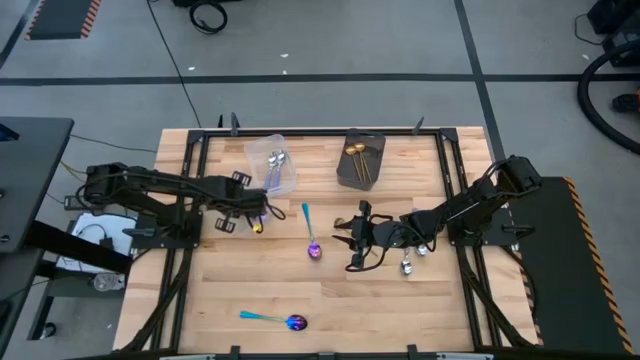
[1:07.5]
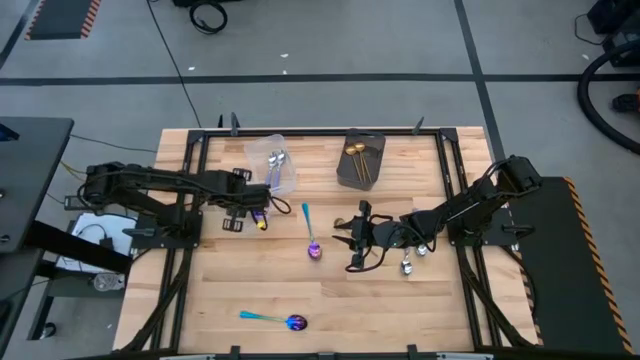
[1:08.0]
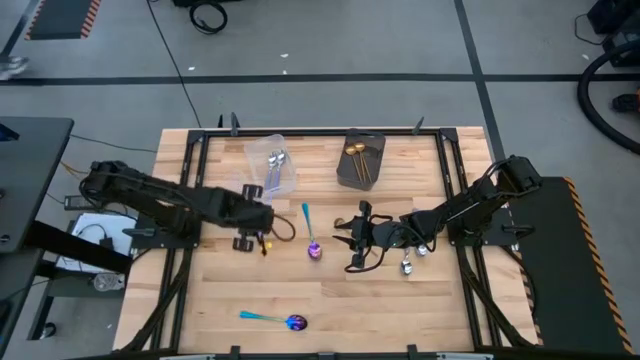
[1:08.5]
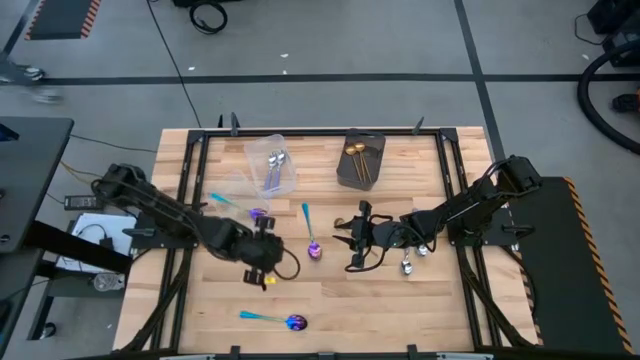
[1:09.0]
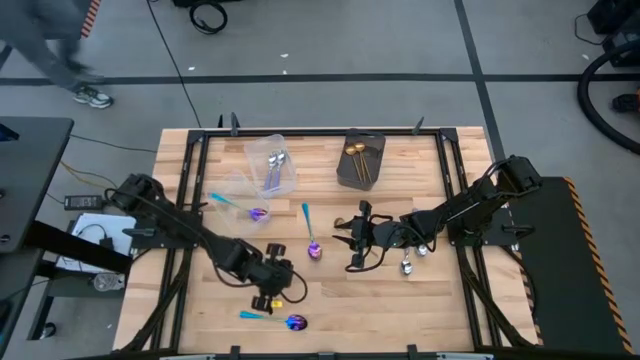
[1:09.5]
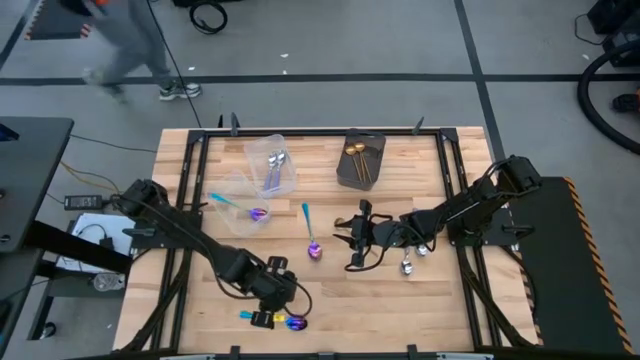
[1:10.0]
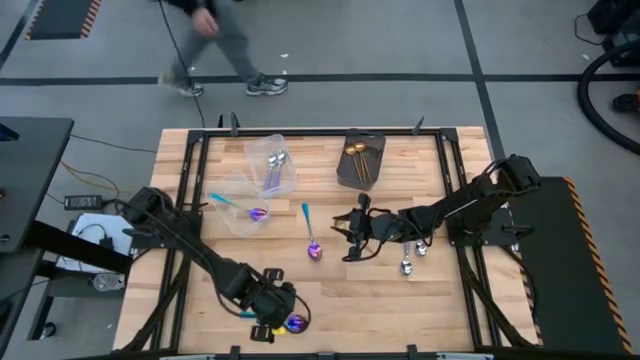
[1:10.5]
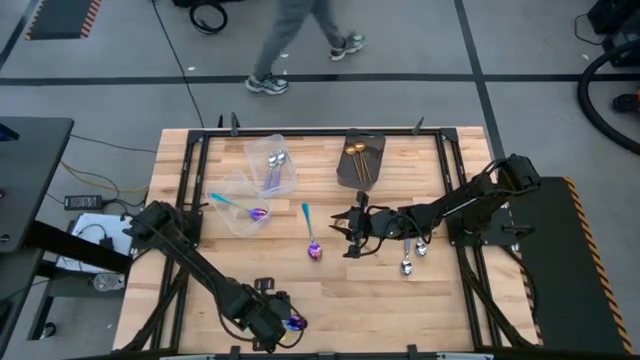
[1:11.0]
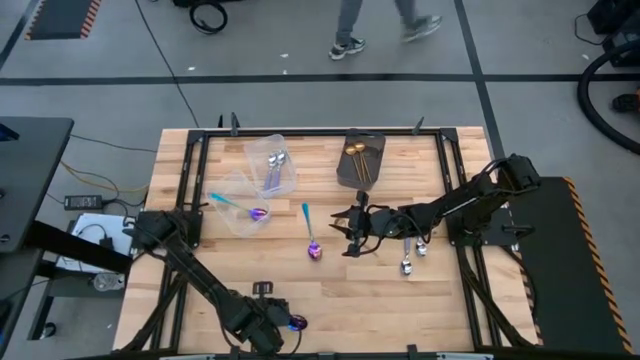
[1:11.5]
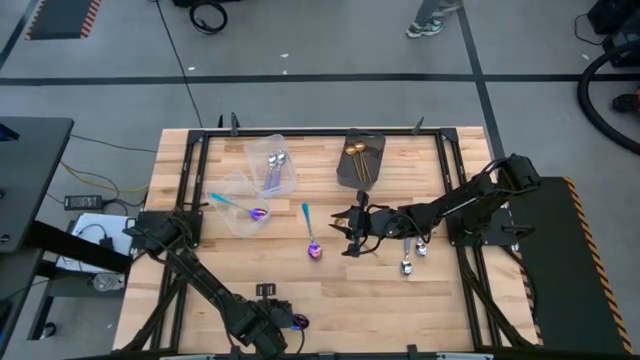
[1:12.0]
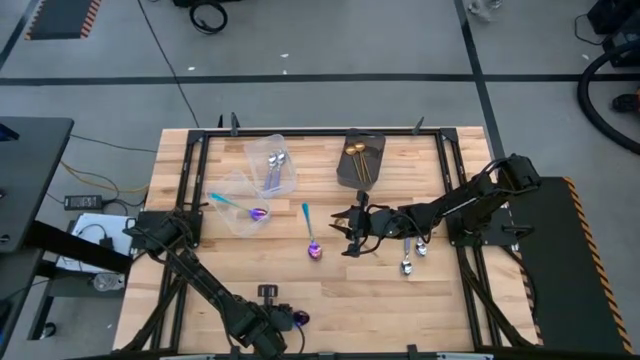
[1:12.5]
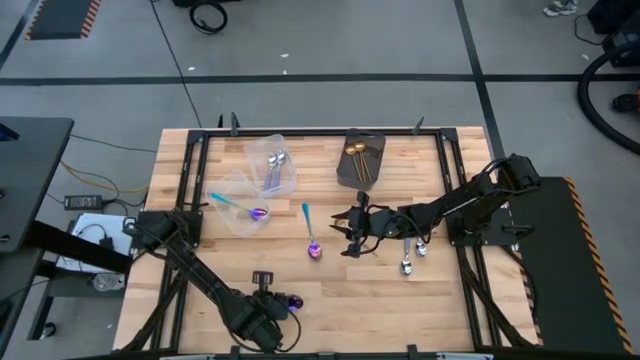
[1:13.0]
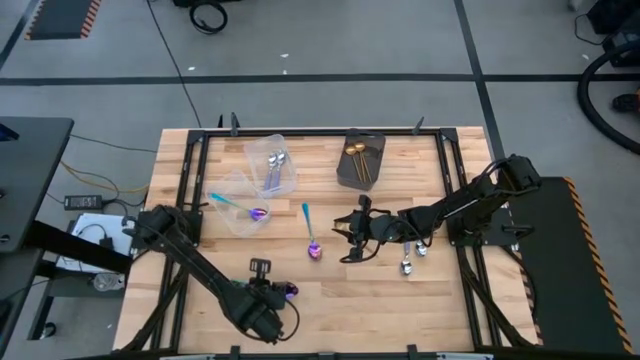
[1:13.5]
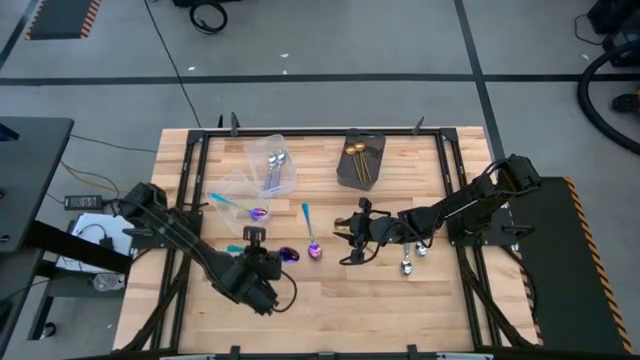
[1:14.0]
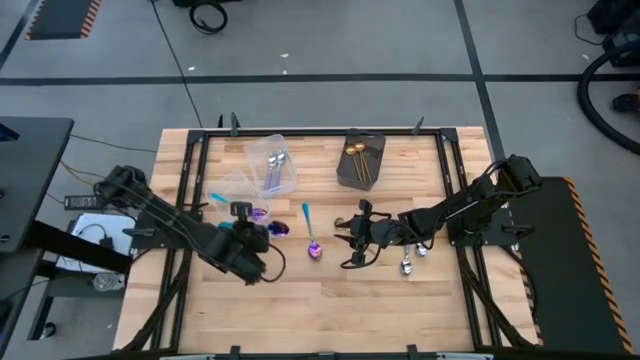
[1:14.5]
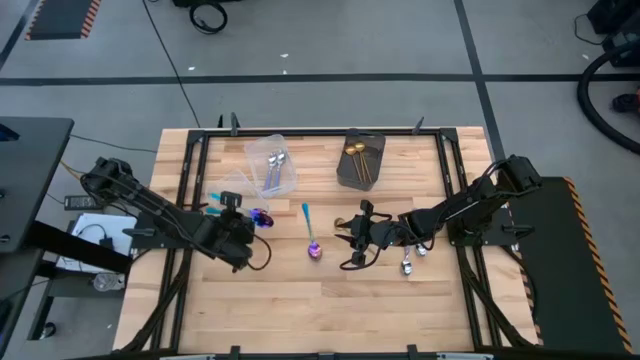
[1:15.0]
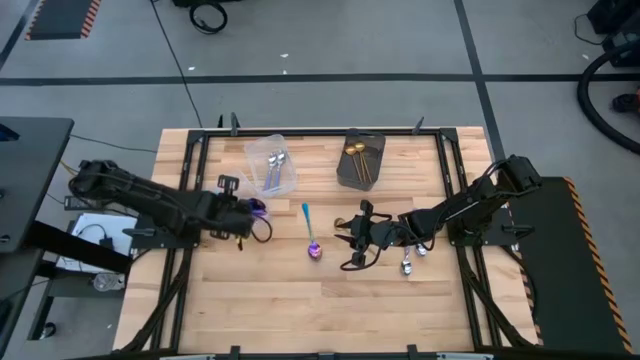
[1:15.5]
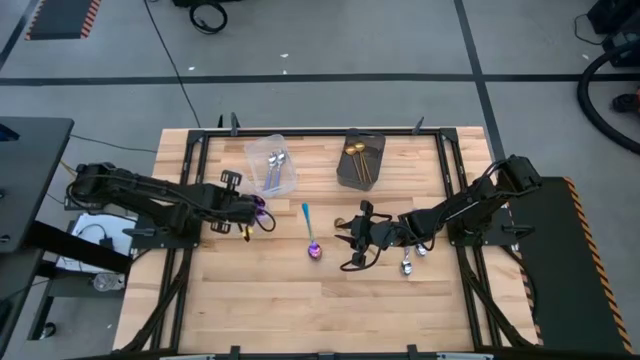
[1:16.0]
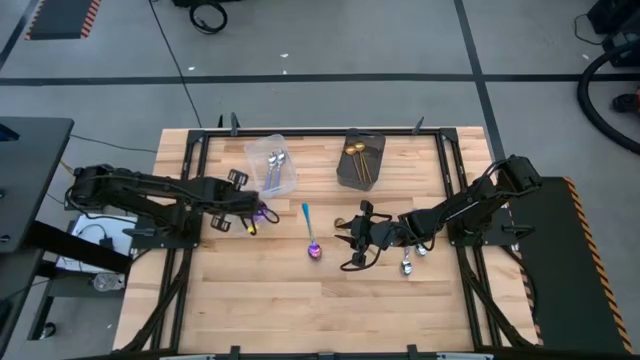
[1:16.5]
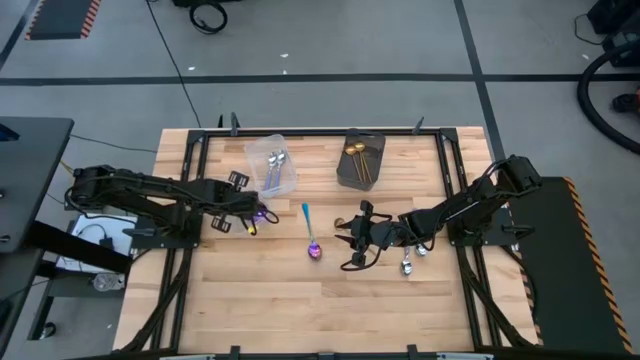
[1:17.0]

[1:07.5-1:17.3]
Task: Sort silverware by color (type)
Put the blue spoon into the left transparent bin

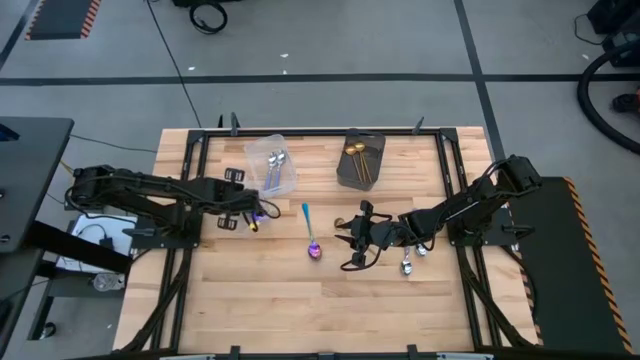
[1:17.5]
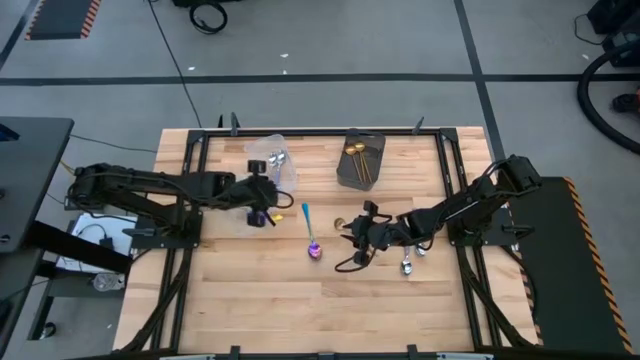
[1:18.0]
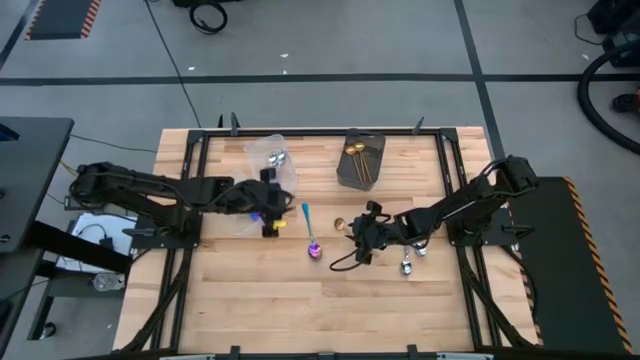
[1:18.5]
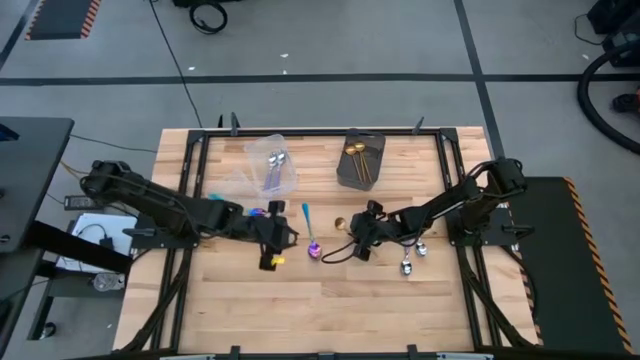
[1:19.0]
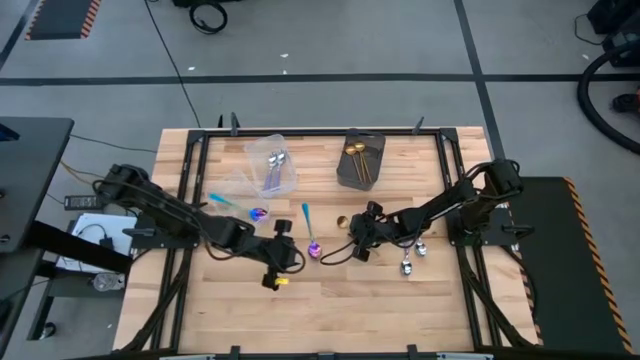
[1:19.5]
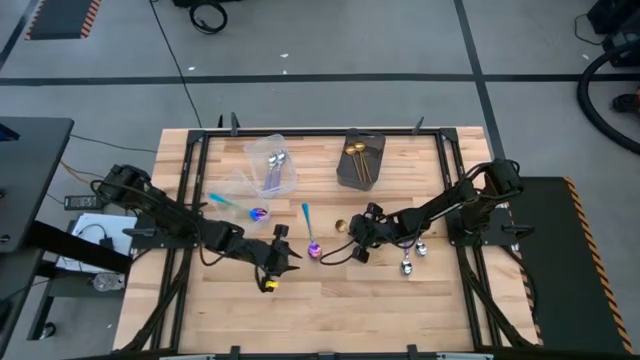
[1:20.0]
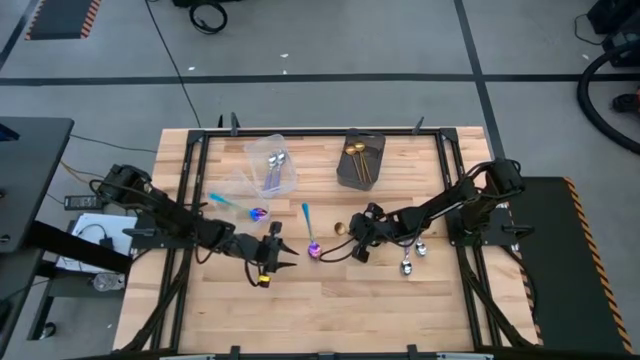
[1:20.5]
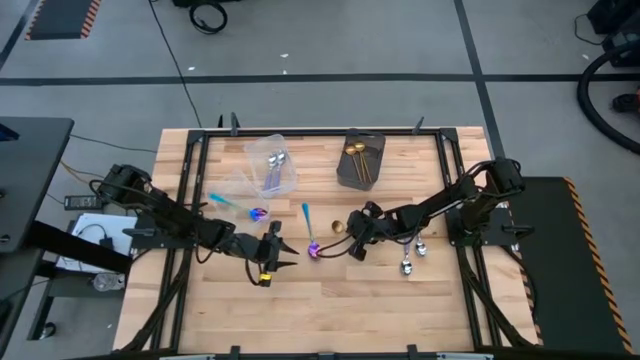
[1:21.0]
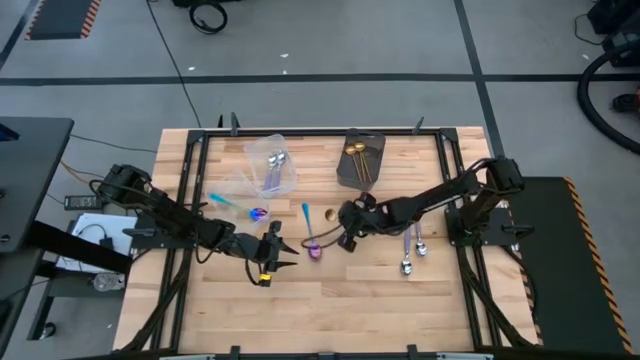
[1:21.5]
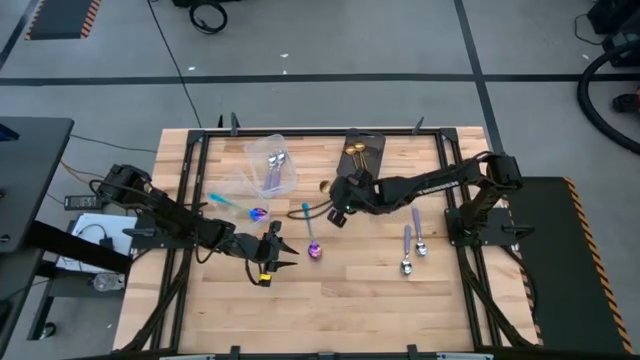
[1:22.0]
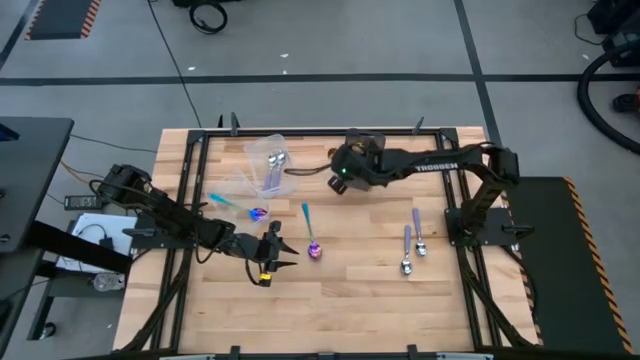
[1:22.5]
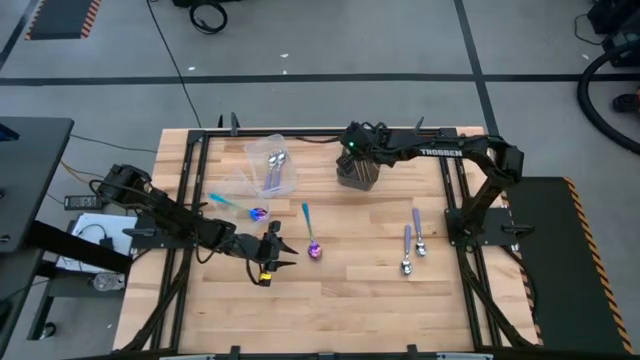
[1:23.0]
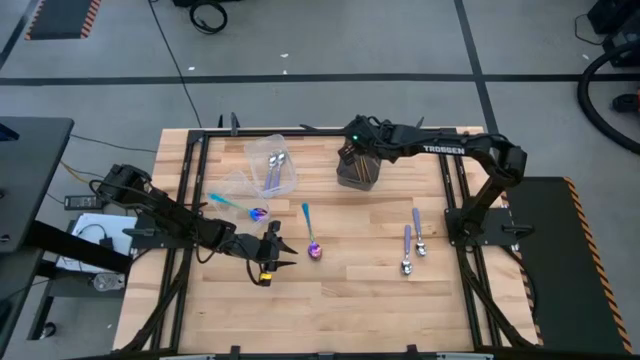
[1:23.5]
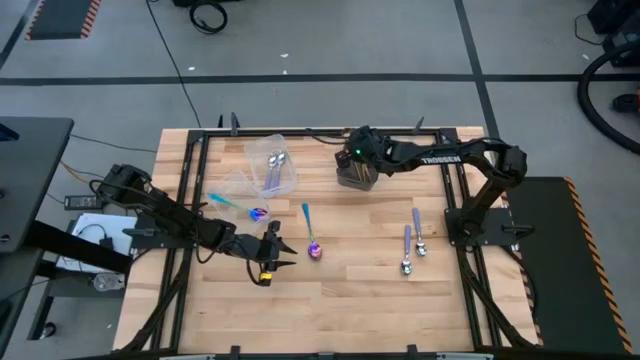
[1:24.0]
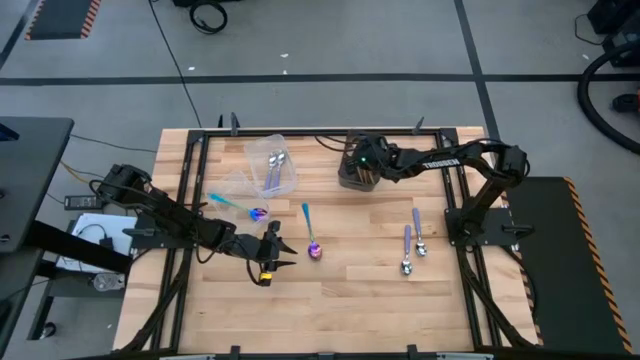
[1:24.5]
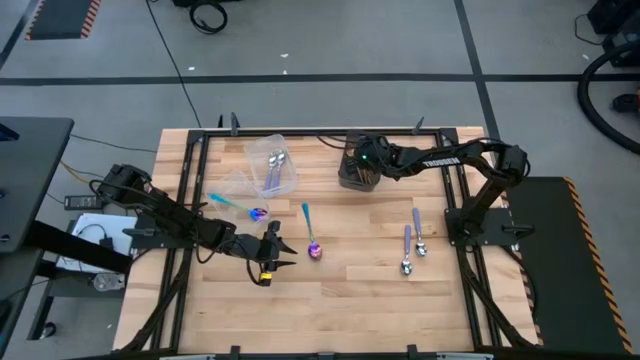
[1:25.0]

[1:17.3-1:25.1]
Put the gold spoon into the black bin

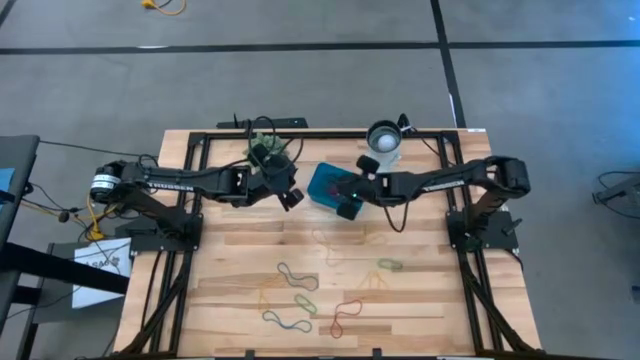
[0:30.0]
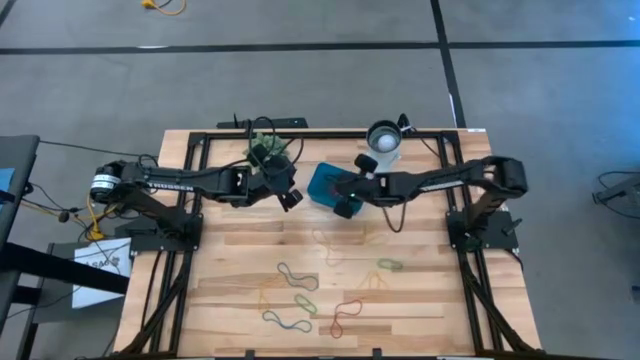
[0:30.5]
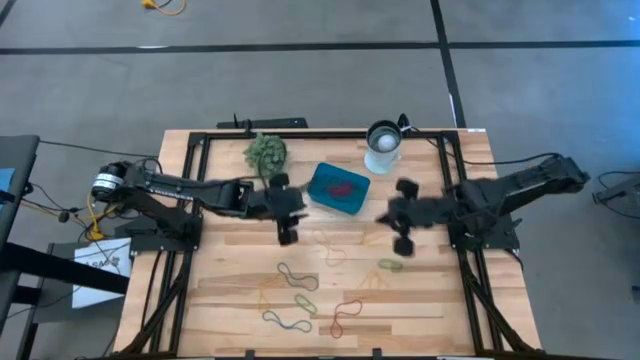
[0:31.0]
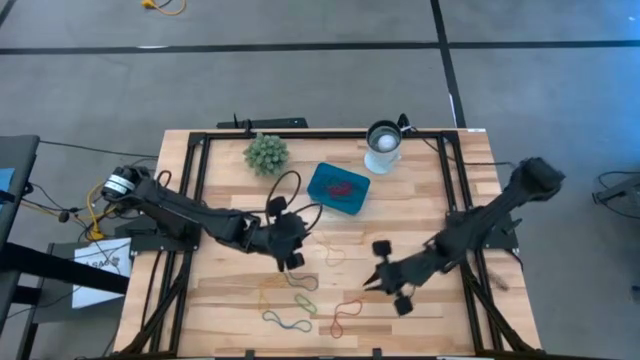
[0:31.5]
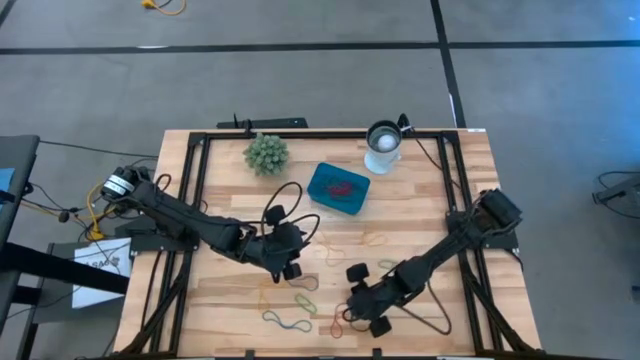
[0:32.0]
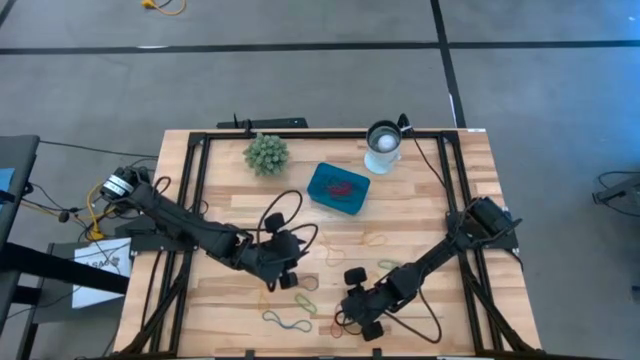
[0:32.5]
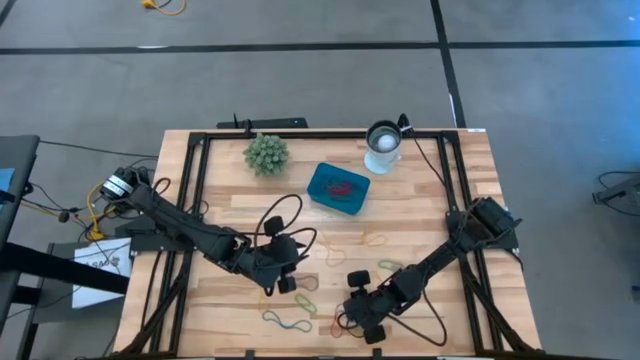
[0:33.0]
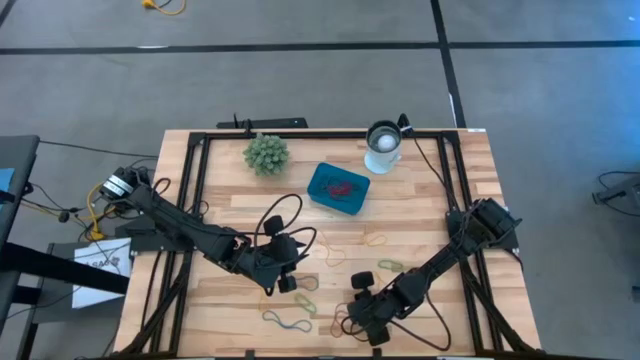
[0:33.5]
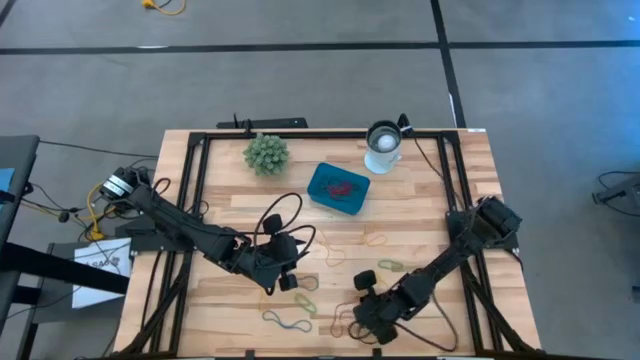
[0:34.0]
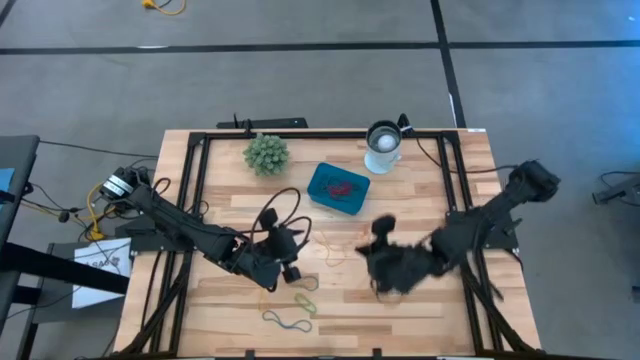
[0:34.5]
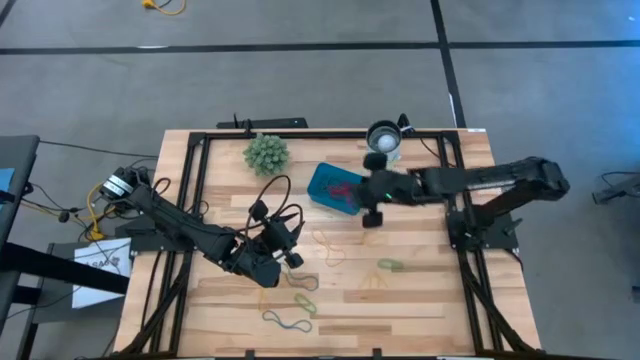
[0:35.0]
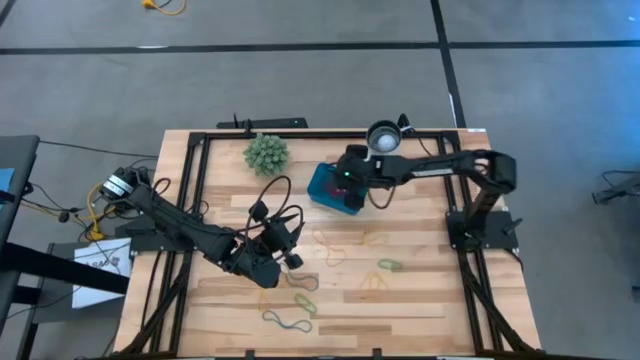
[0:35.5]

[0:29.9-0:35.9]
Task: Pick and place items into bin
Put the red rubber band into the blue bin
